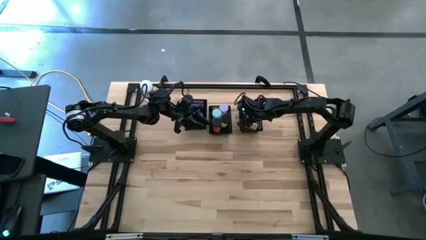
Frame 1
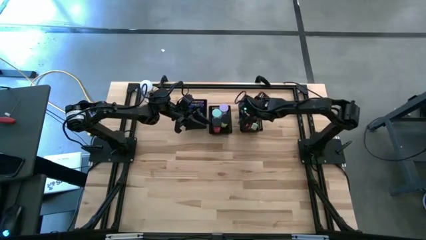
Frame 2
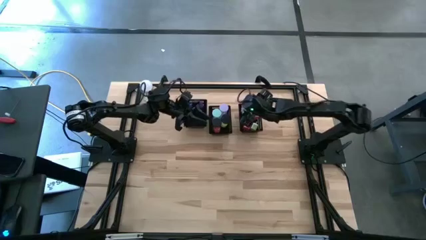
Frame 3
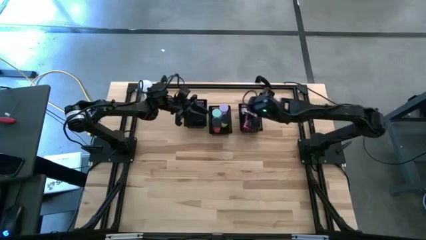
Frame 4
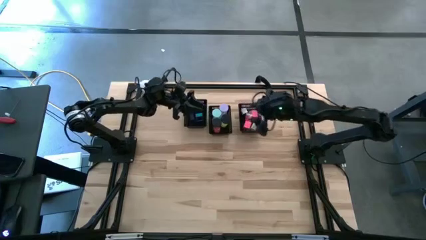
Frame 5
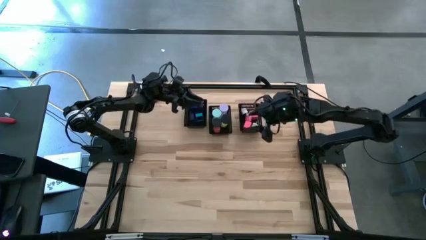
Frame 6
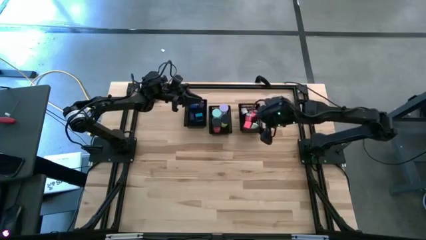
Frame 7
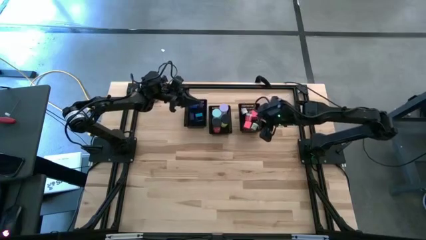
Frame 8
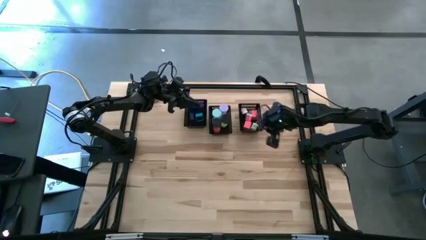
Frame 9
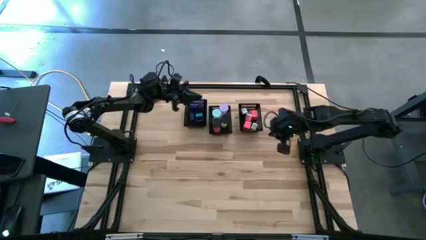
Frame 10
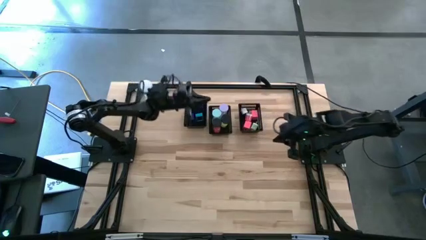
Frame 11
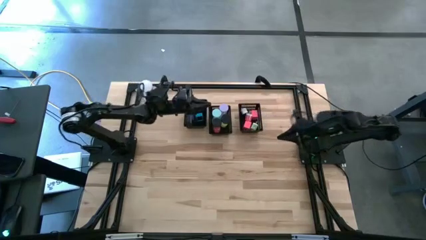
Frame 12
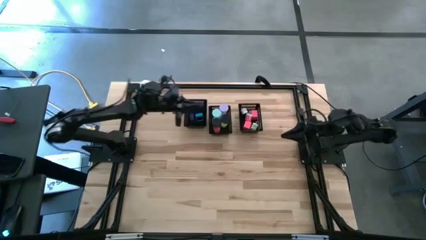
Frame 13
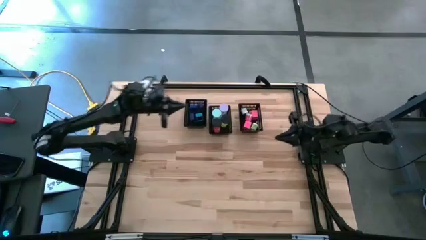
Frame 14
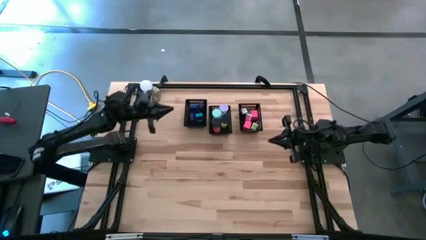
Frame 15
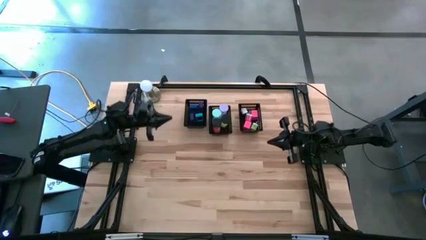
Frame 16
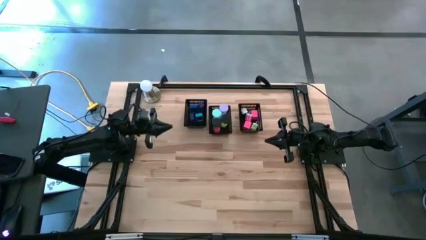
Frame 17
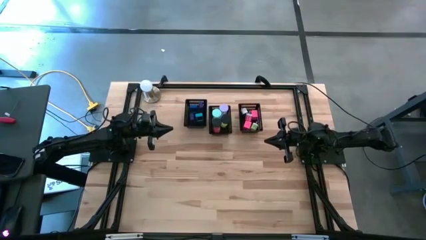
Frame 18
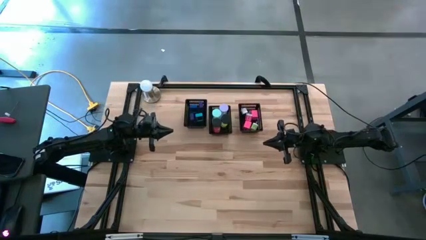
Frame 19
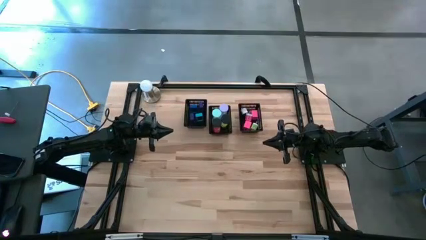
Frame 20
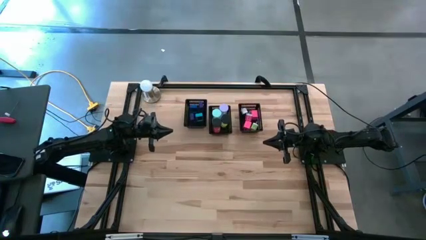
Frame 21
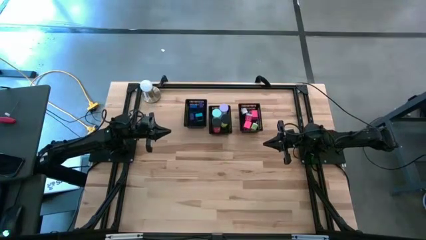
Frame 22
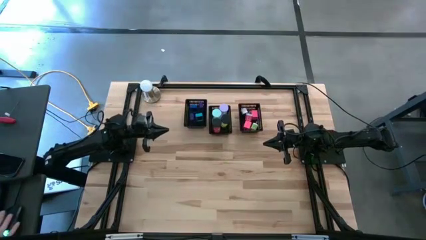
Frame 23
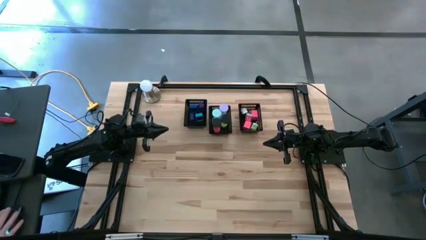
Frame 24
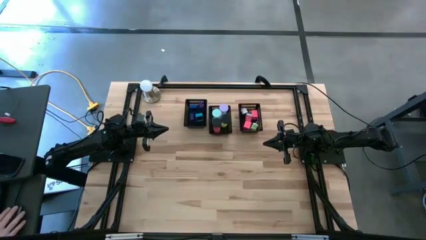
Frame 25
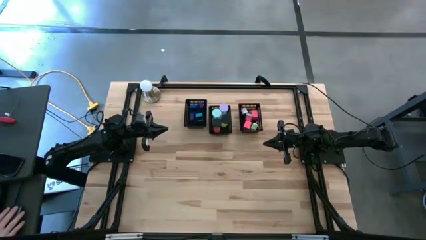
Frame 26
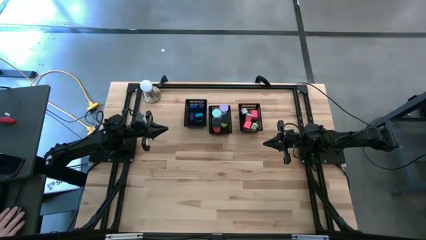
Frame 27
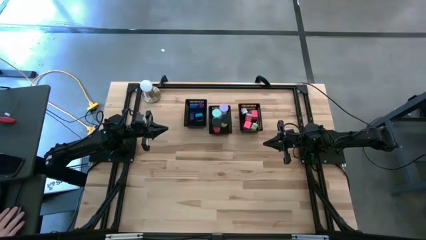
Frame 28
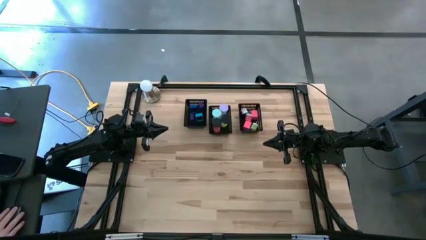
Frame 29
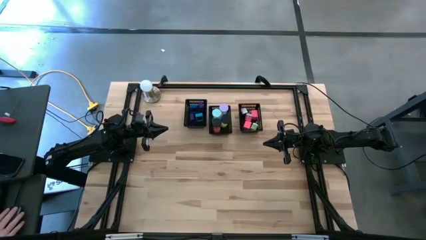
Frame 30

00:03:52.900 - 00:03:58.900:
Task: Pick & Place Office items
Return to Home Position

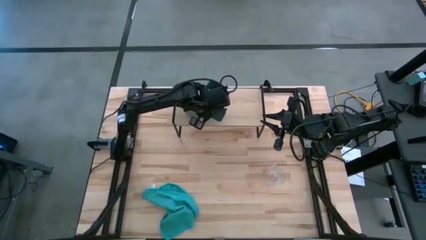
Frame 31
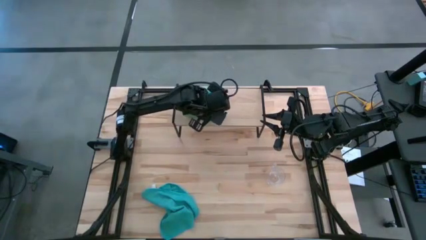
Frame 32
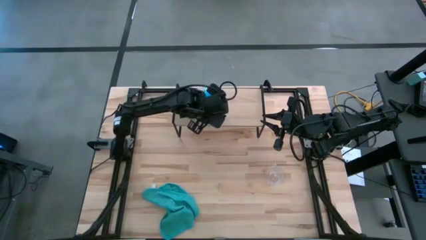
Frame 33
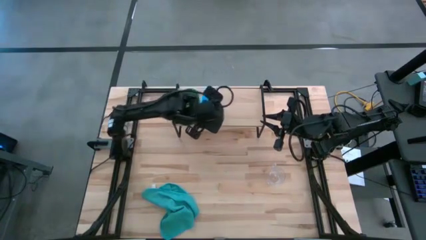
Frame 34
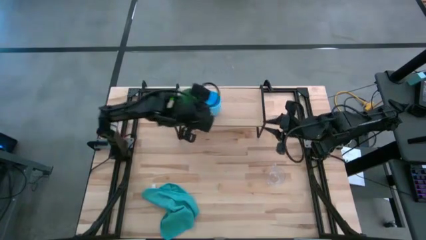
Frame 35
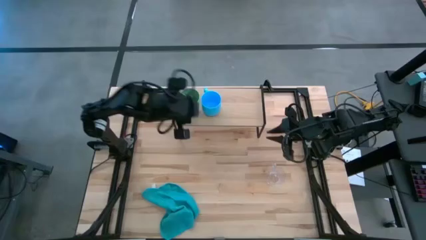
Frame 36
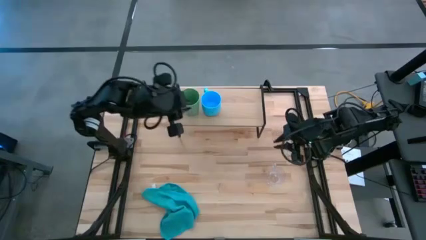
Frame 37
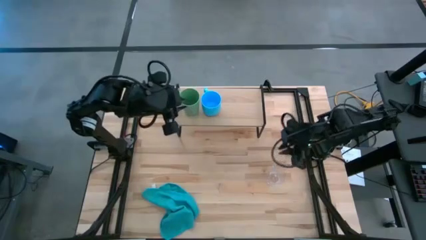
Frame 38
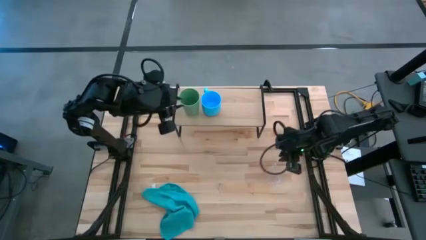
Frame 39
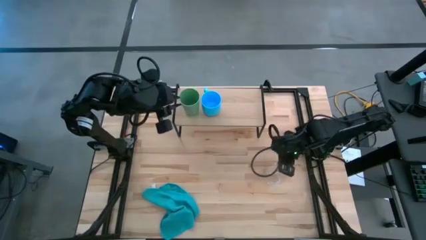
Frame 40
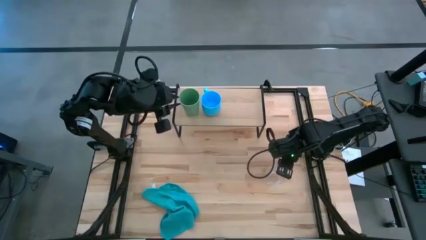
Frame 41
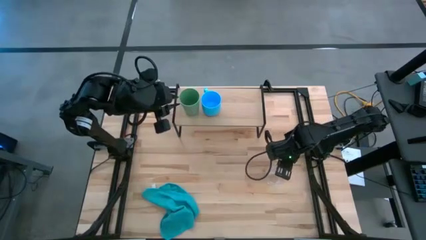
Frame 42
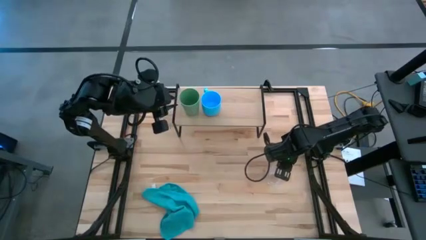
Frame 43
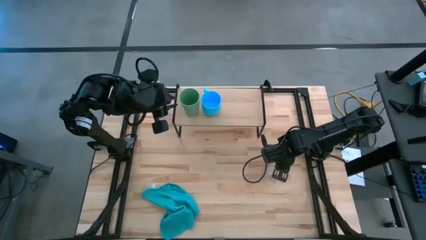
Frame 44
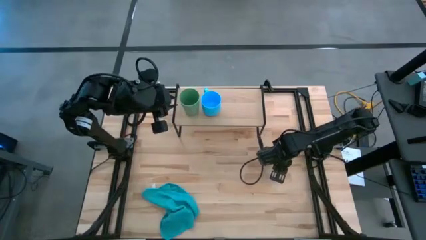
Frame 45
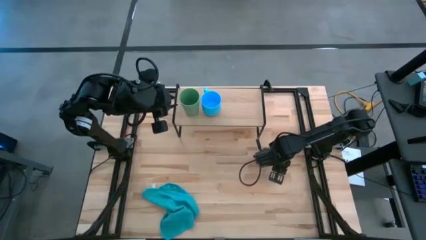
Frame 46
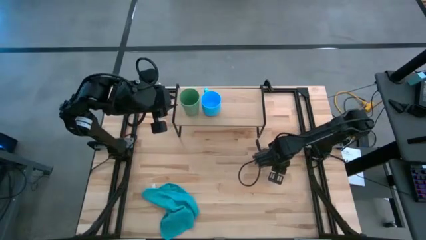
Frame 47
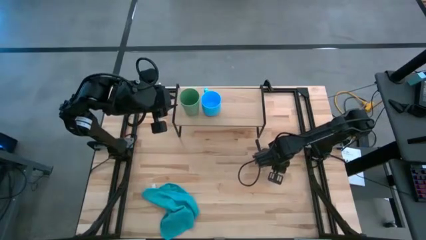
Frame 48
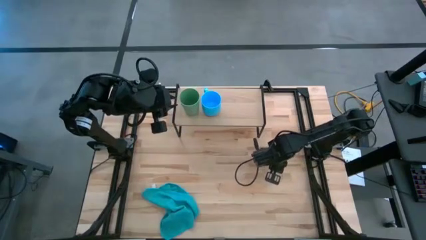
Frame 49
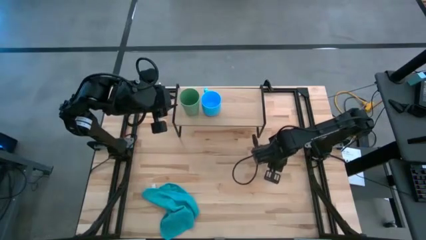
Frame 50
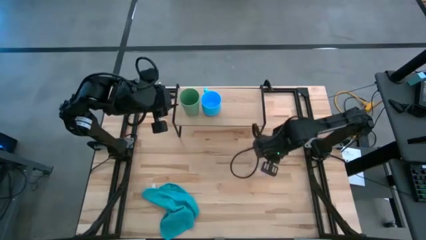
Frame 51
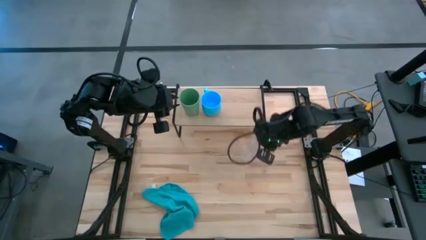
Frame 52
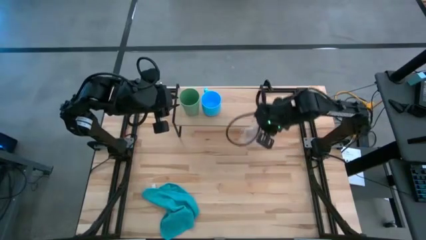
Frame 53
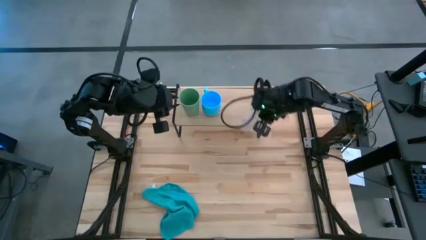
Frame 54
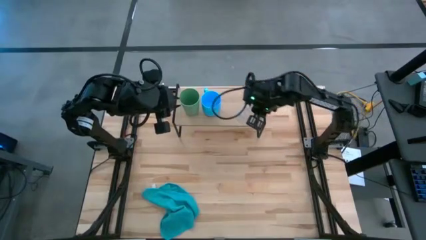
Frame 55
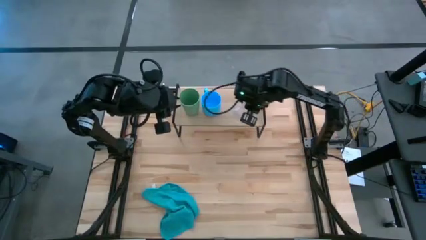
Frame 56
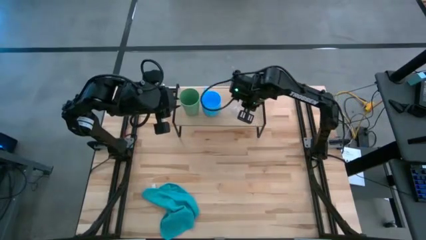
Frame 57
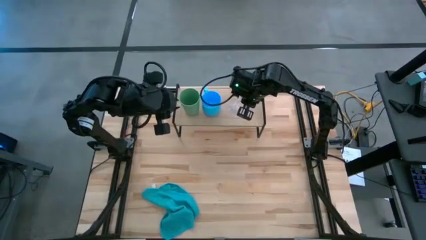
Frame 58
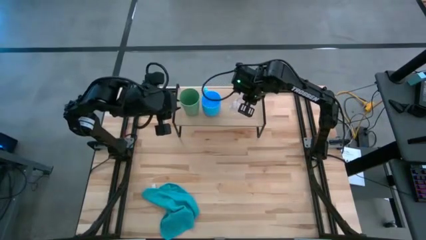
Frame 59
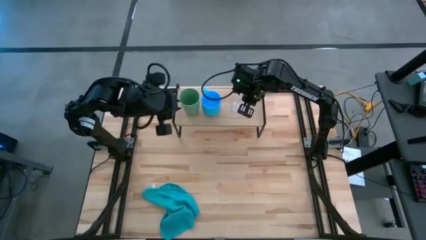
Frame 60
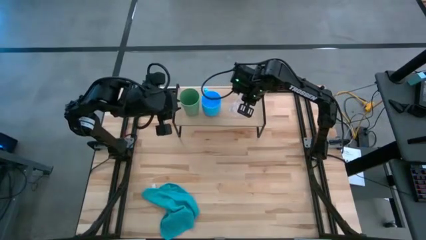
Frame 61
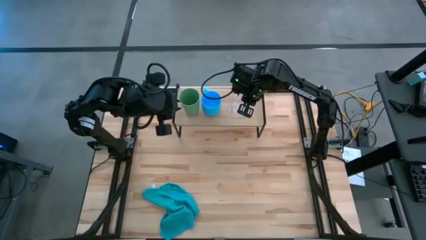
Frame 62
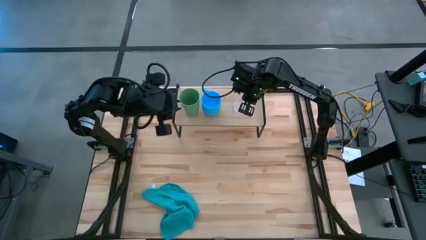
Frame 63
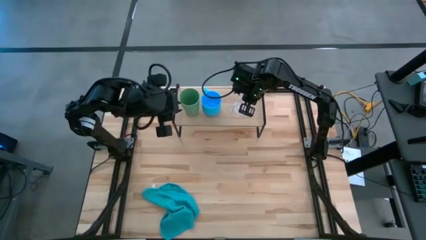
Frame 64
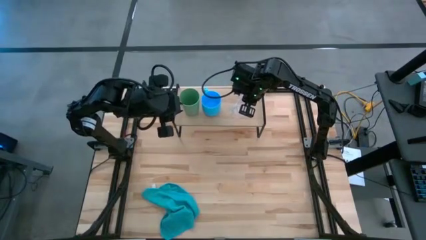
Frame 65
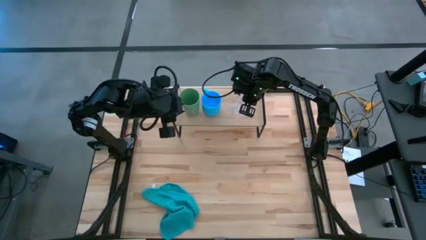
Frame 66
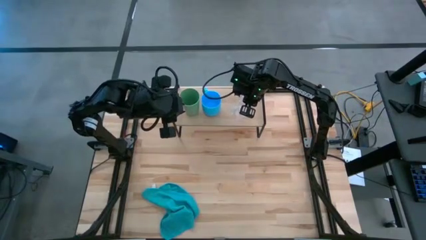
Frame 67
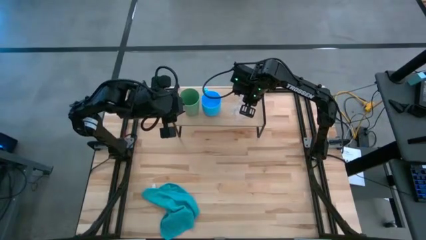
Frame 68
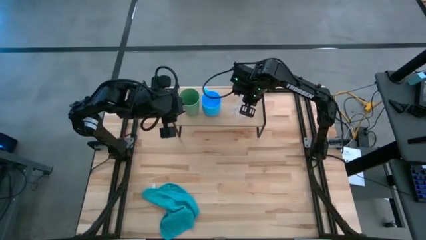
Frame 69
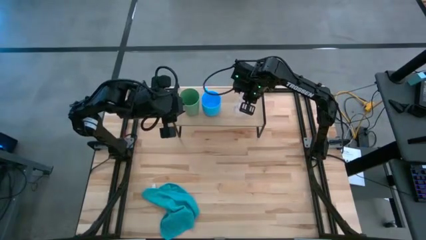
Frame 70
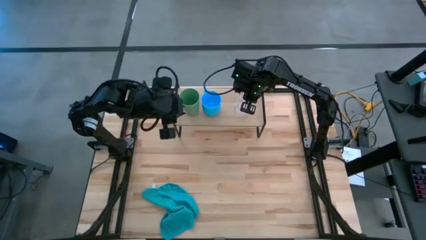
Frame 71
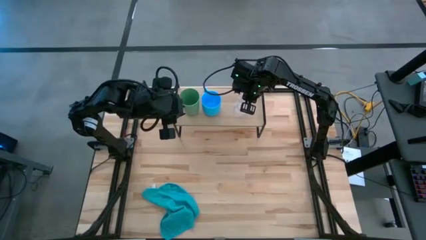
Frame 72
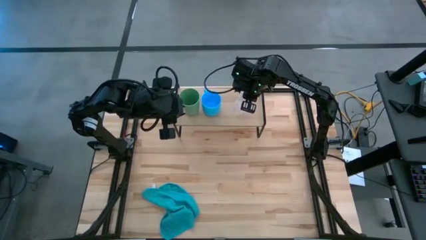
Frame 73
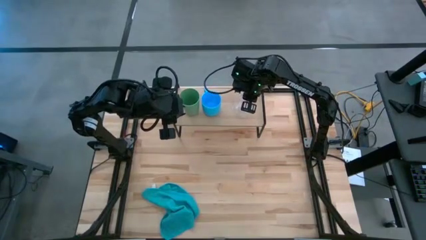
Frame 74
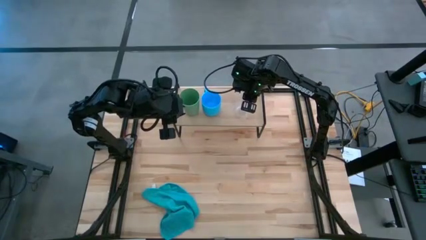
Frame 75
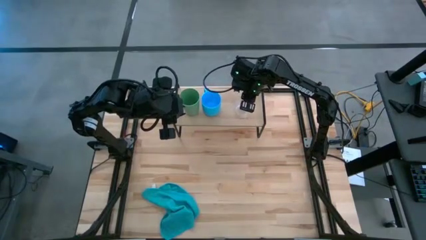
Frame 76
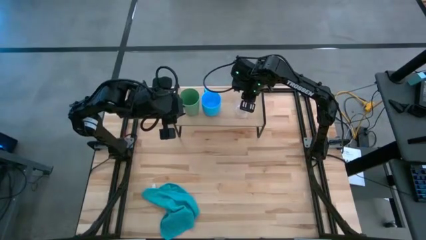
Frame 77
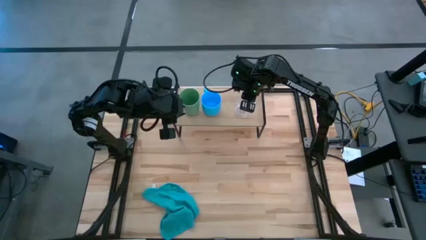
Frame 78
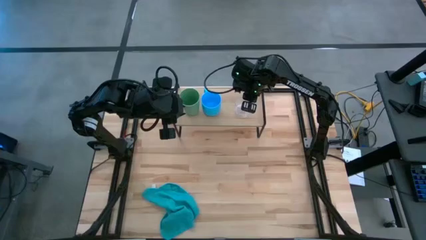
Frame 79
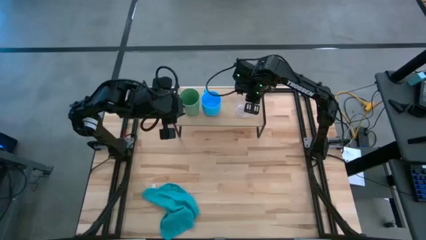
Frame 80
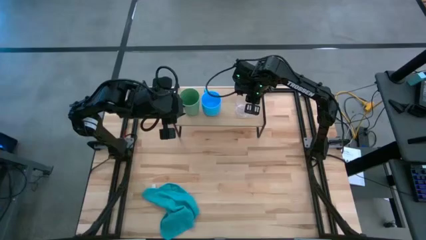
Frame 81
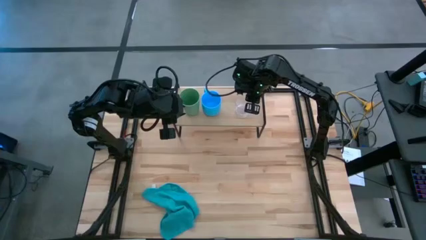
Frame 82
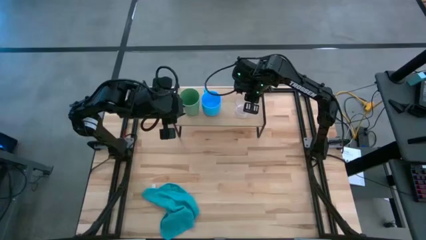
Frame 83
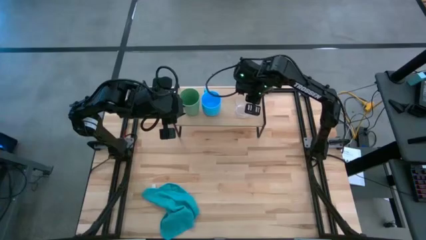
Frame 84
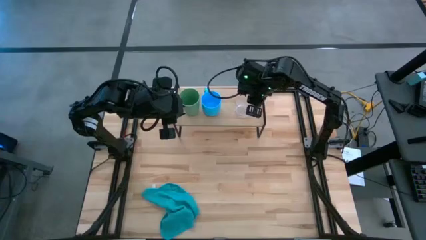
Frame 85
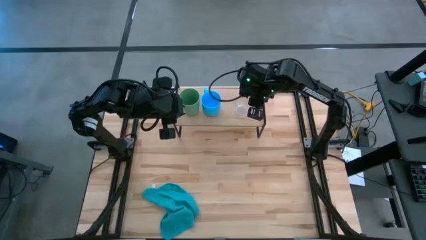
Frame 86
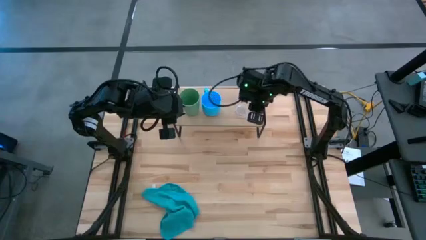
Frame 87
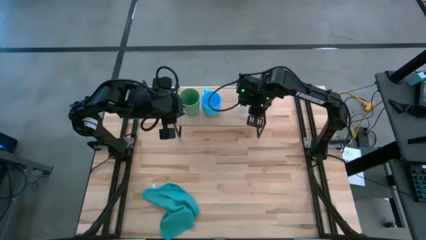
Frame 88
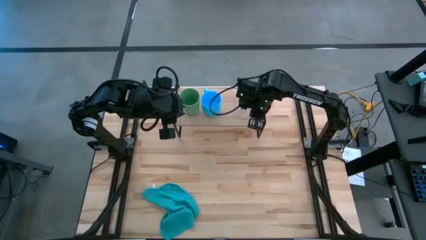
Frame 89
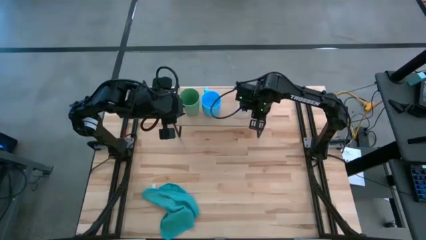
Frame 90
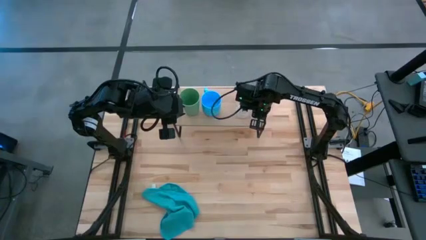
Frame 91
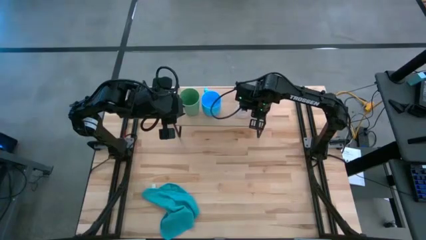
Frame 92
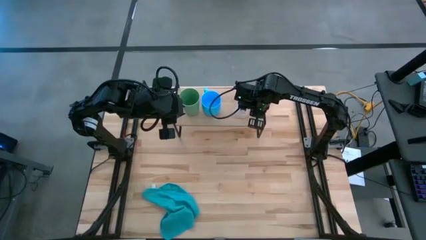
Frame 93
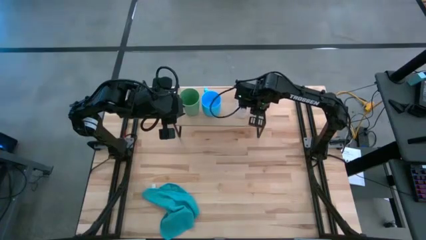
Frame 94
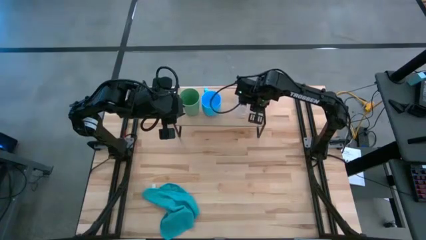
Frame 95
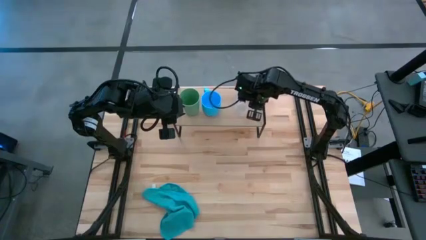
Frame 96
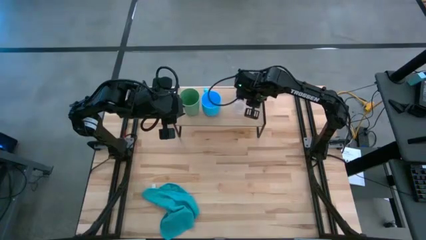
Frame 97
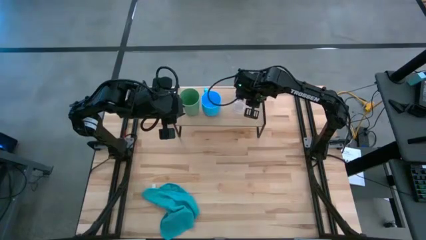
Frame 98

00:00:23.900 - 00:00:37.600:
Task: Stack small to large cups/mugs on shelf
Put the transparent cup on the shelf
